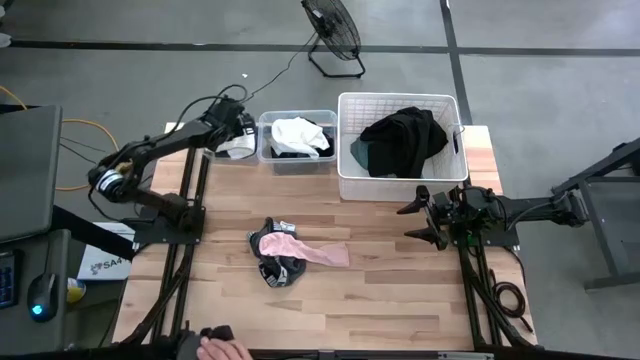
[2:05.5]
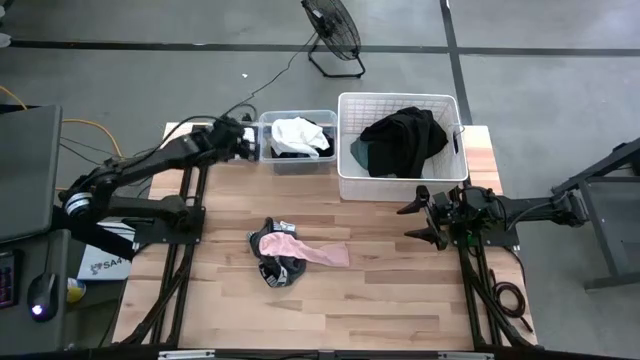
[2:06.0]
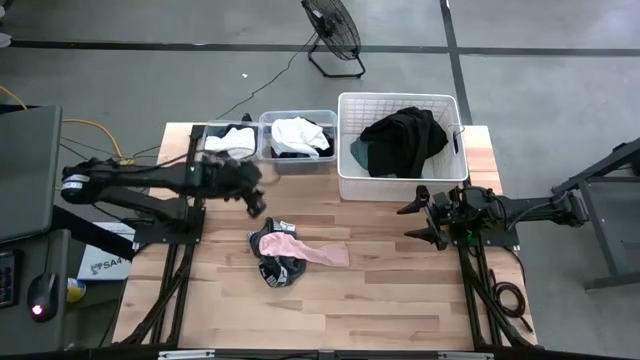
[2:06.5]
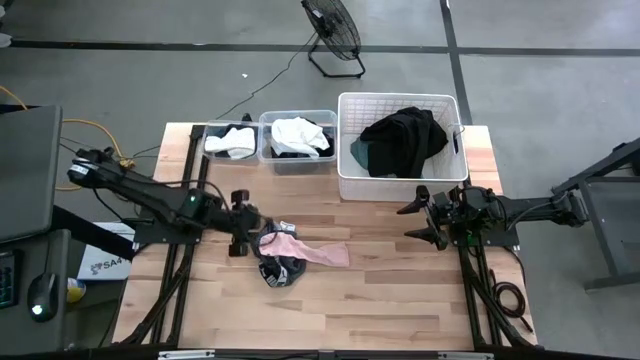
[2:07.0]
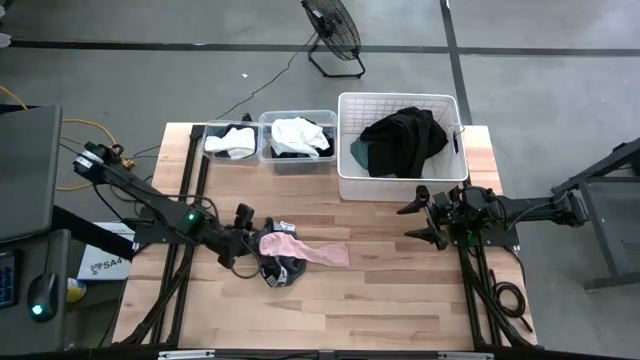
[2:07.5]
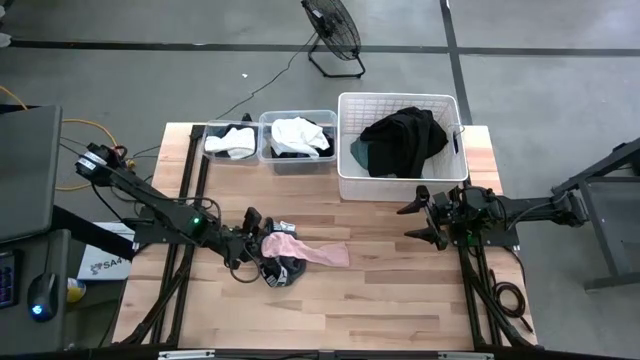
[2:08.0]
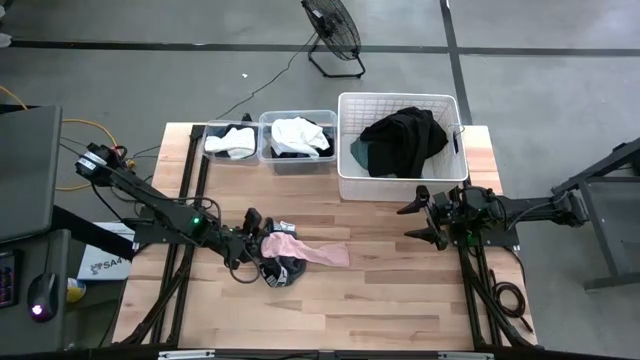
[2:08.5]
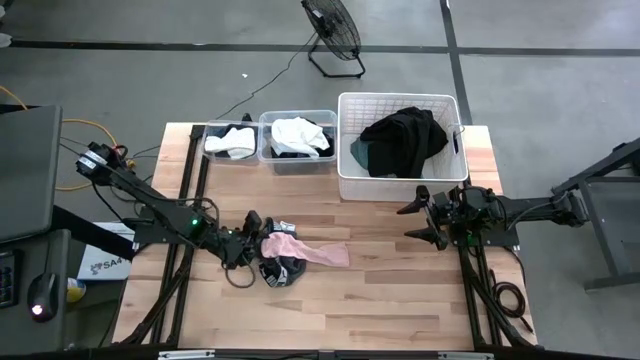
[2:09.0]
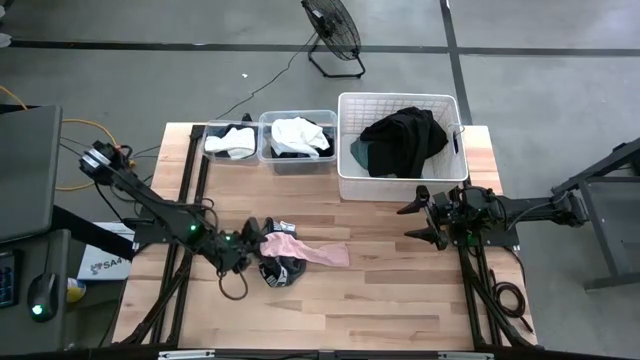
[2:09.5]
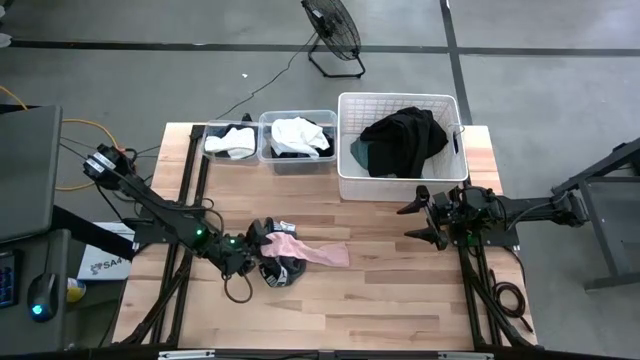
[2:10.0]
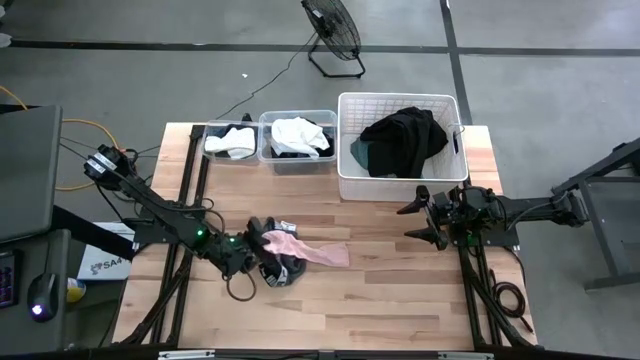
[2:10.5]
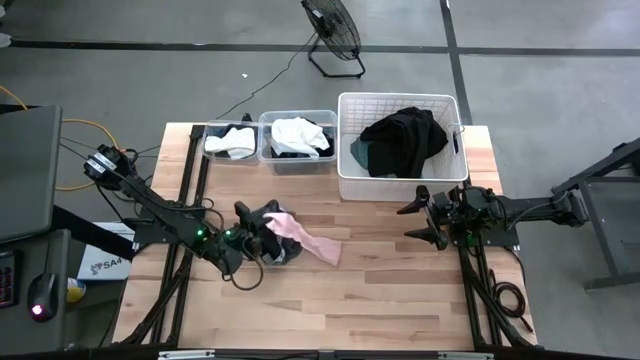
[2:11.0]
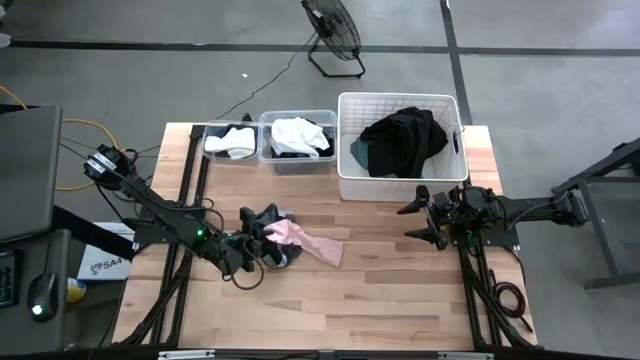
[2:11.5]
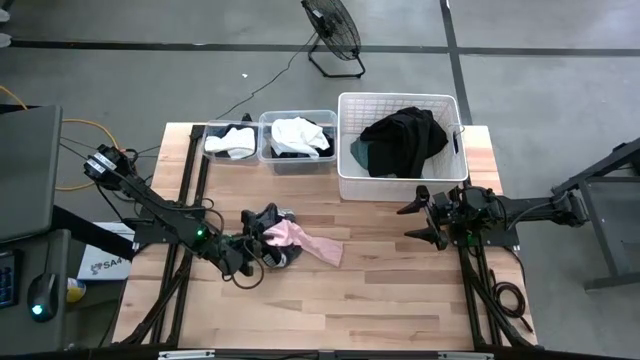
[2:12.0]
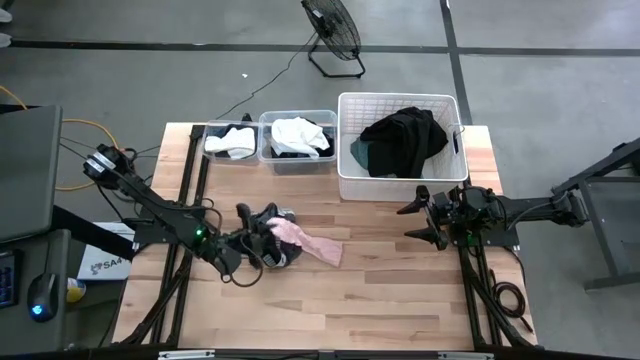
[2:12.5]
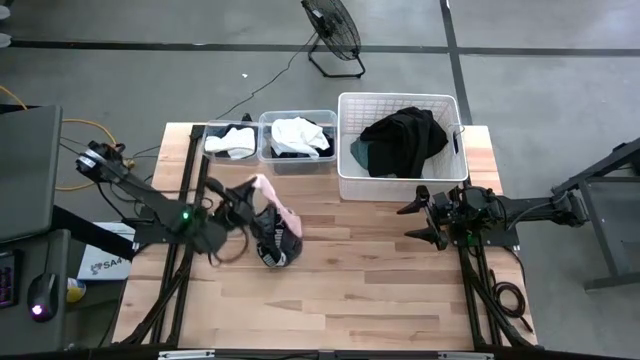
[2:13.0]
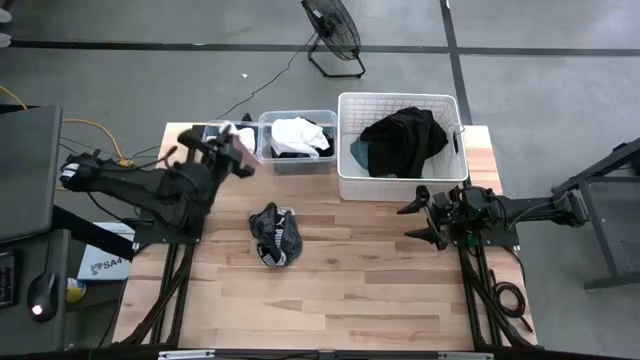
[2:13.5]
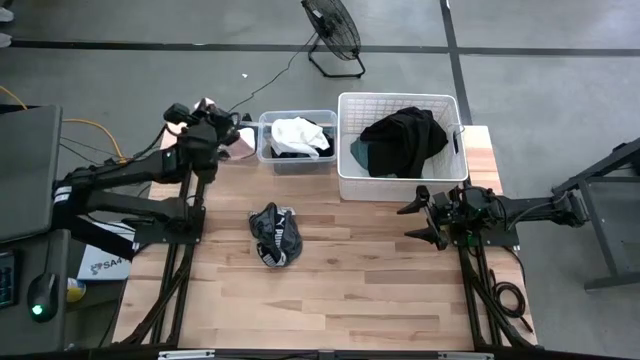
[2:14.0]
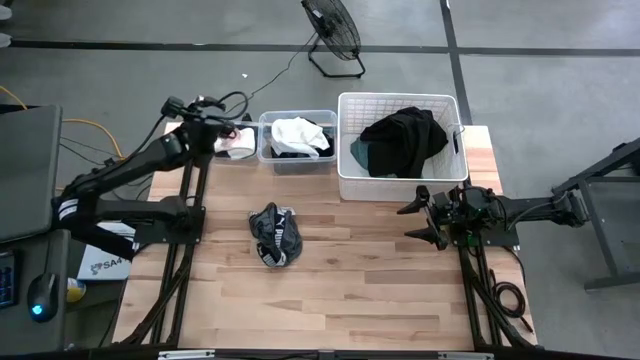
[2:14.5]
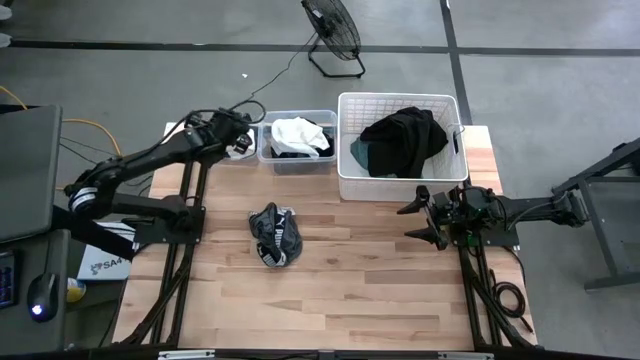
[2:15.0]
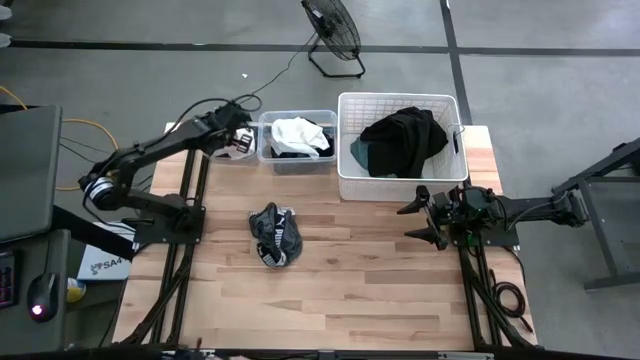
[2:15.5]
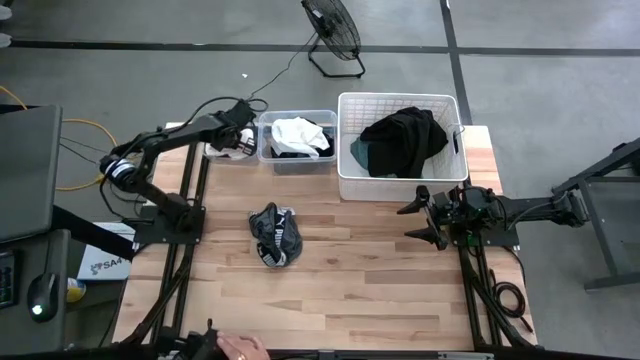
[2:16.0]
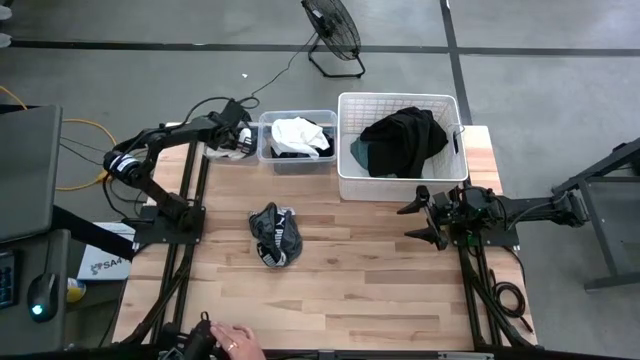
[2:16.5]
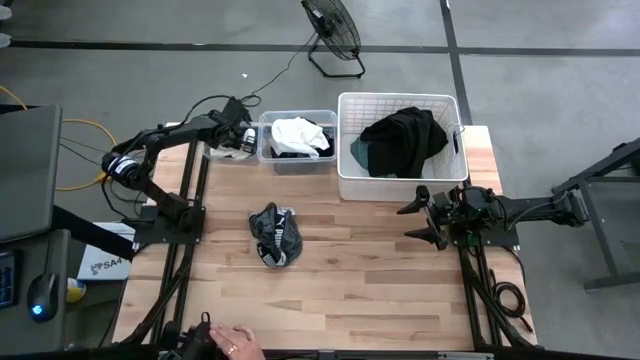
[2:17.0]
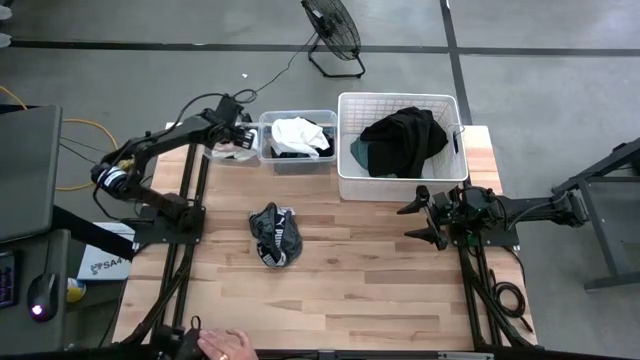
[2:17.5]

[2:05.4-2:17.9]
Task: Pick & Place Cloths
Put the pink sock into the left transparent bin

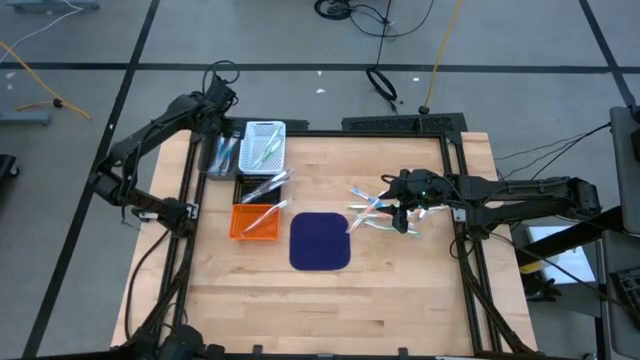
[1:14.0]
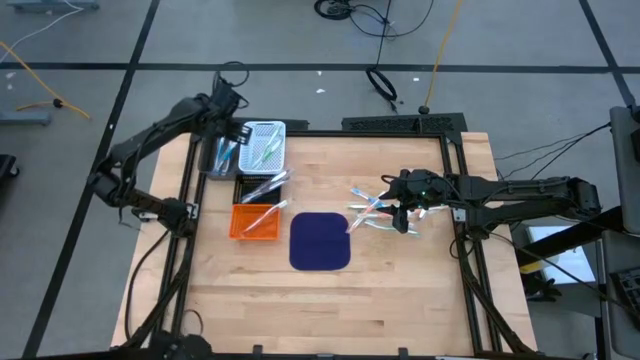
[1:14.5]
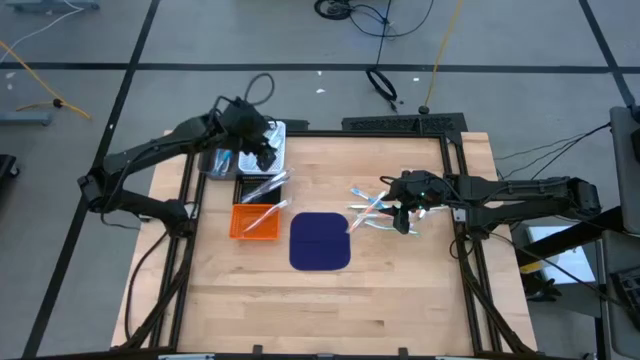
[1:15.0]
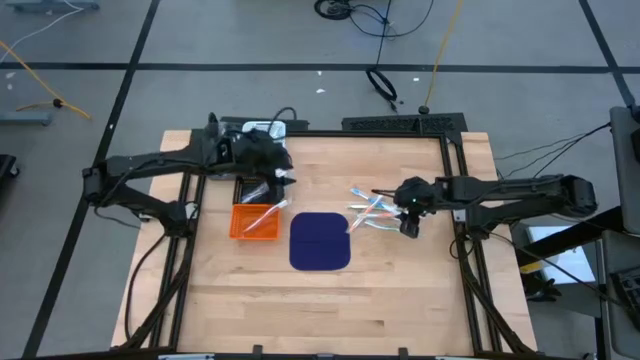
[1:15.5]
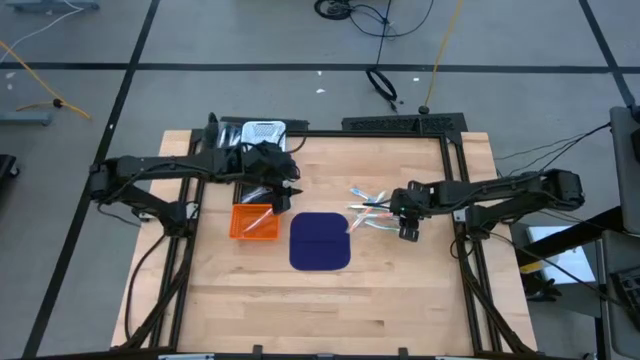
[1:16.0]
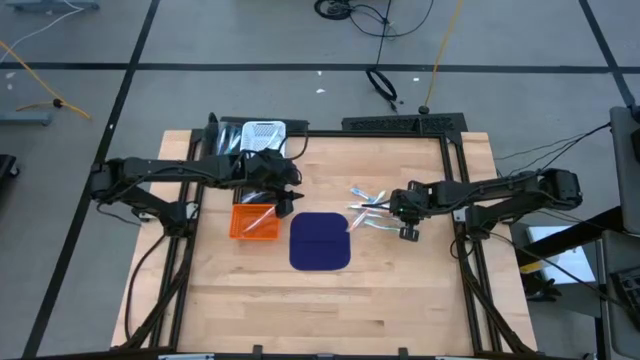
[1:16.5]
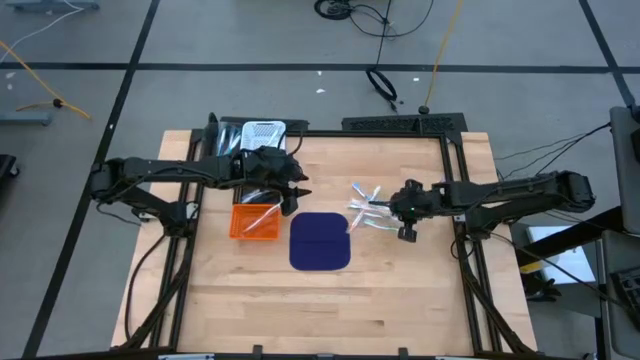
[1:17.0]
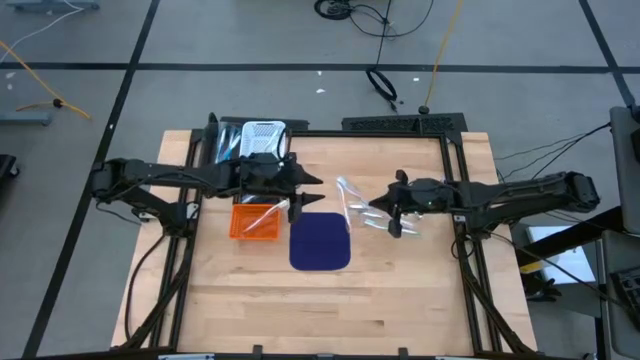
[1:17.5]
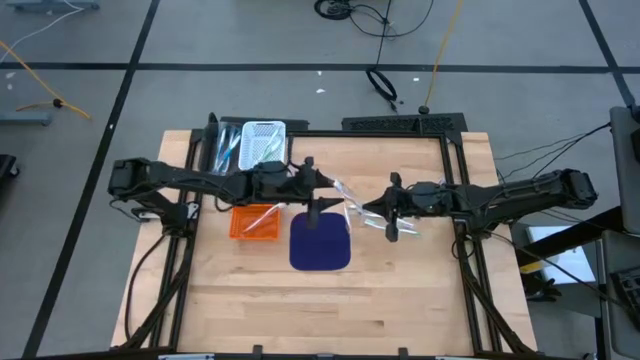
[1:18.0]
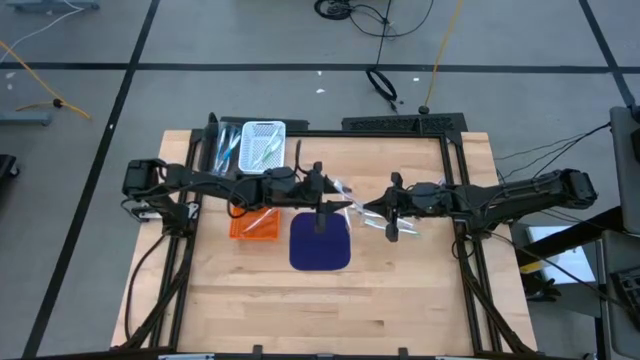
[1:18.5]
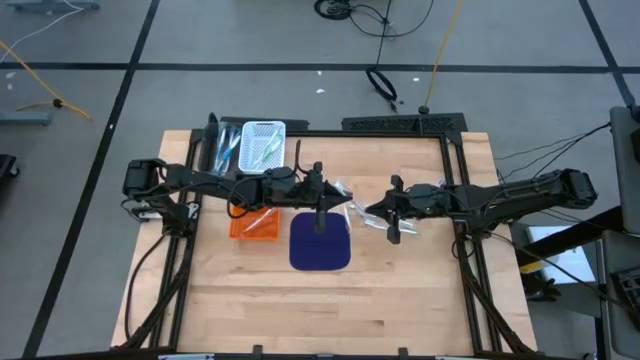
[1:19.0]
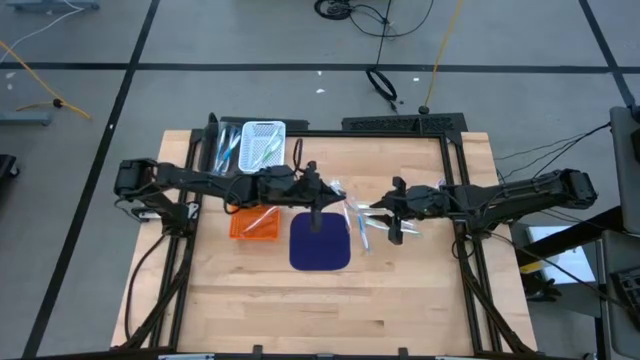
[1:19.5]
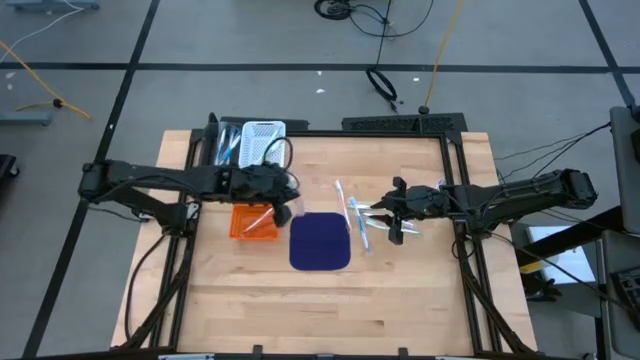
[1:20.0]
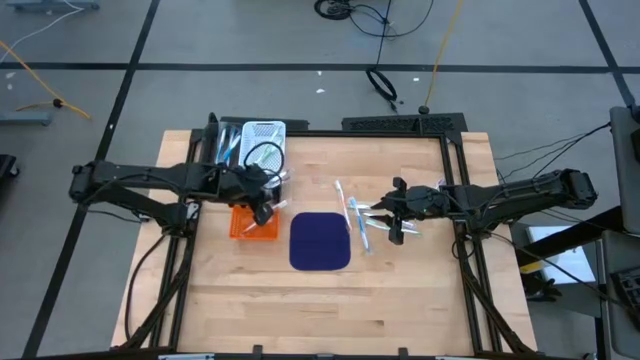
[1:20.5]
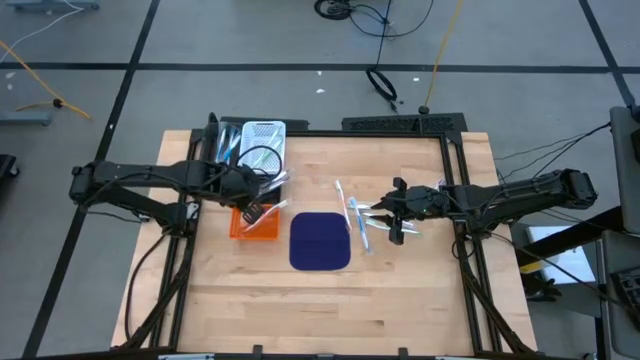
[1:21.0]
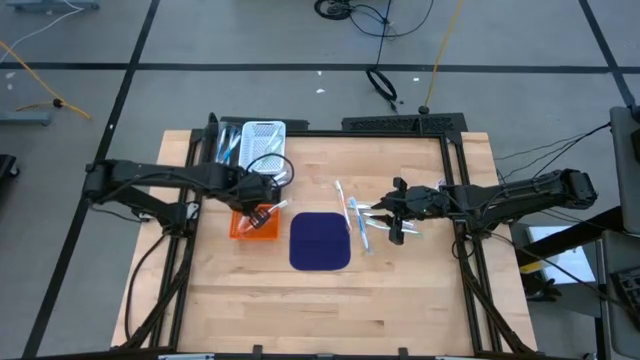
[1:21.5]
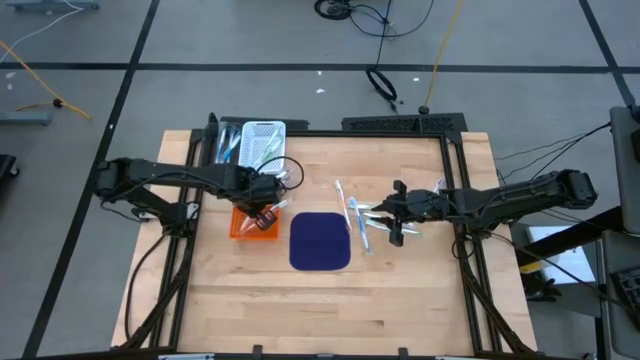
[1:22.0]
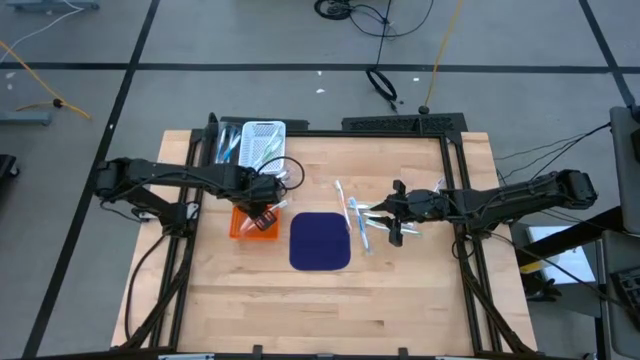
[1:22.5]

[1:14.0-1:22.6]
Task: Pick & Place Toothbrushes
Put the orange toothbrush into the orange bin
